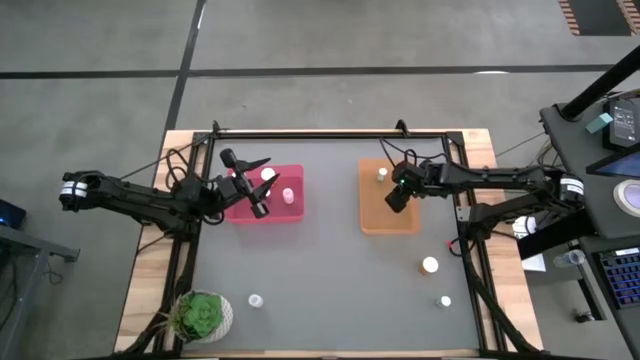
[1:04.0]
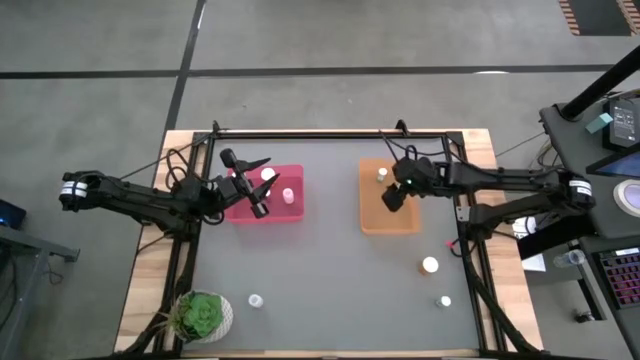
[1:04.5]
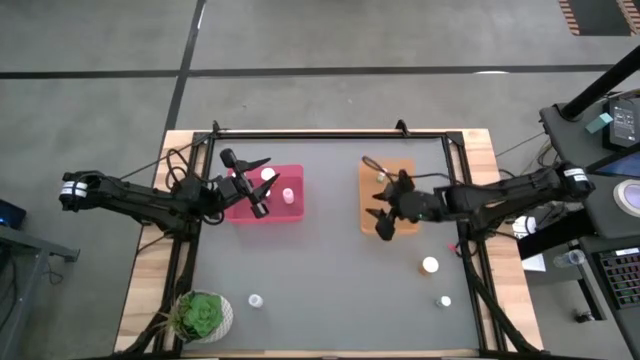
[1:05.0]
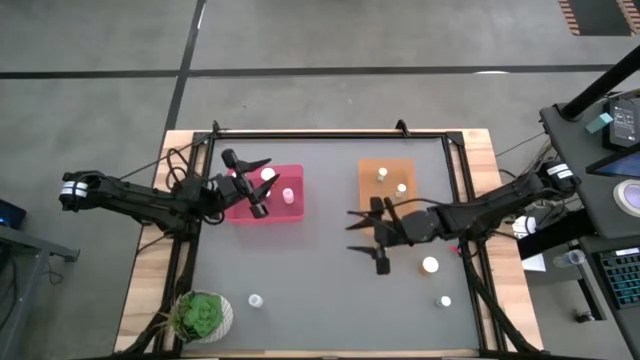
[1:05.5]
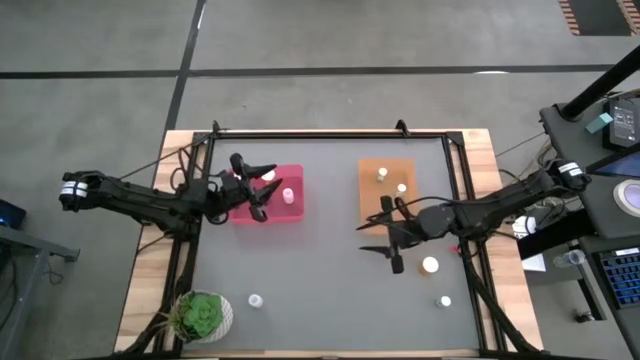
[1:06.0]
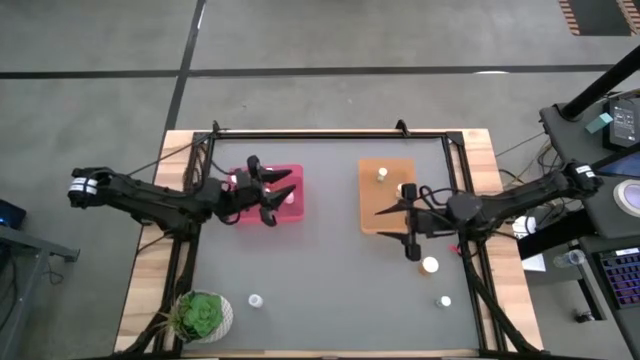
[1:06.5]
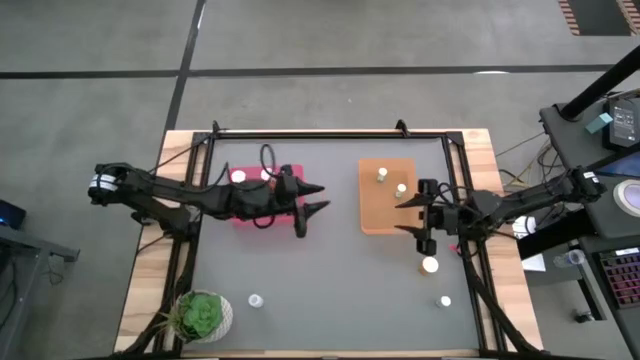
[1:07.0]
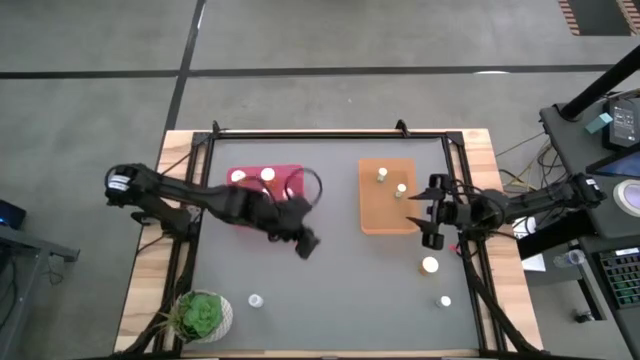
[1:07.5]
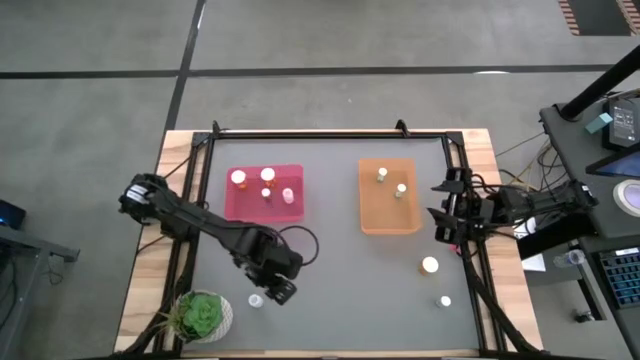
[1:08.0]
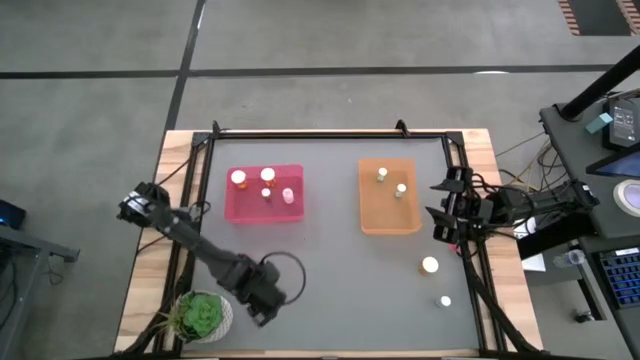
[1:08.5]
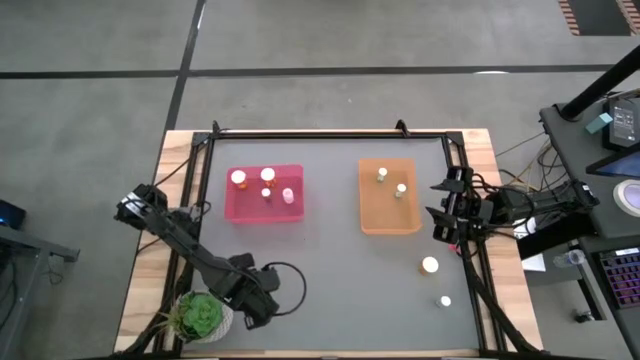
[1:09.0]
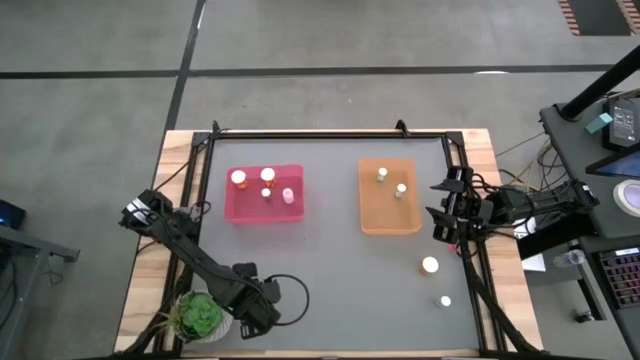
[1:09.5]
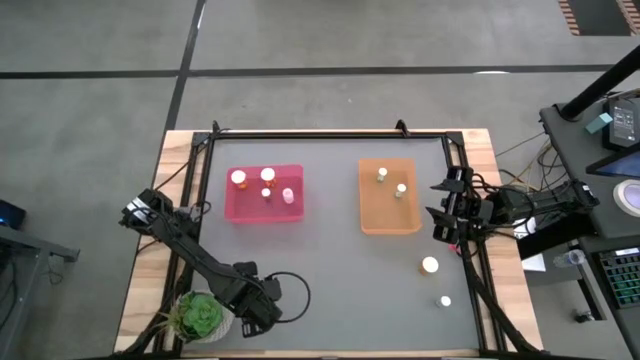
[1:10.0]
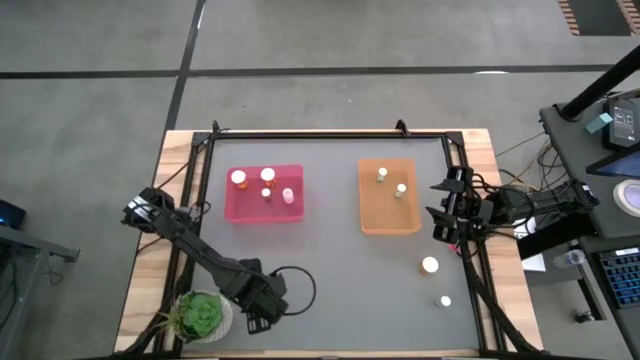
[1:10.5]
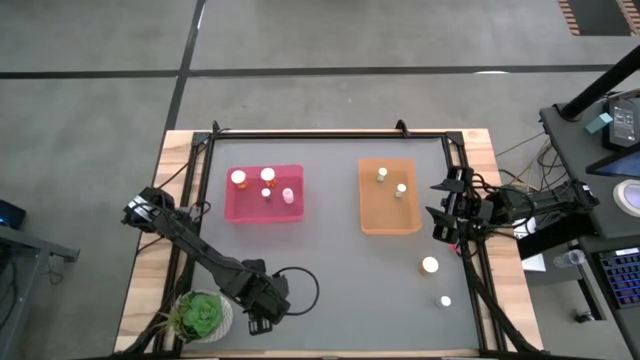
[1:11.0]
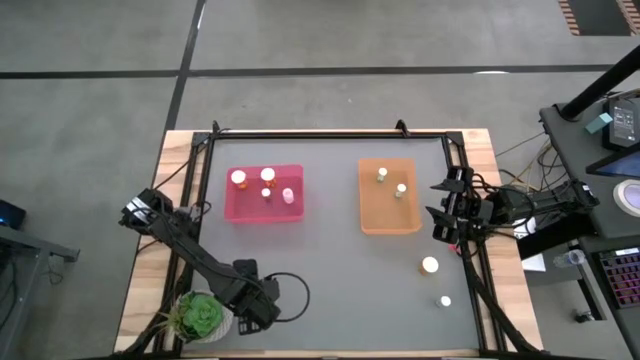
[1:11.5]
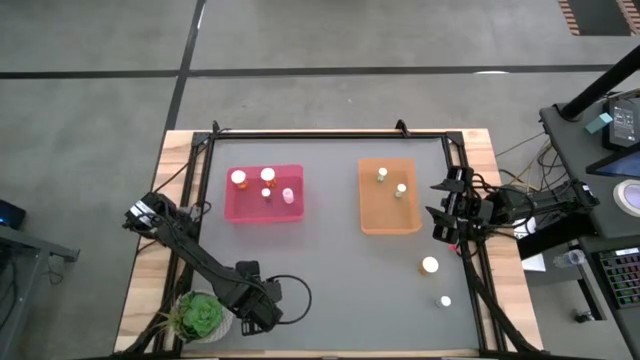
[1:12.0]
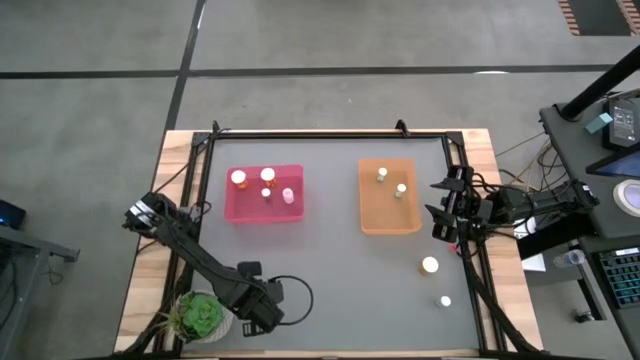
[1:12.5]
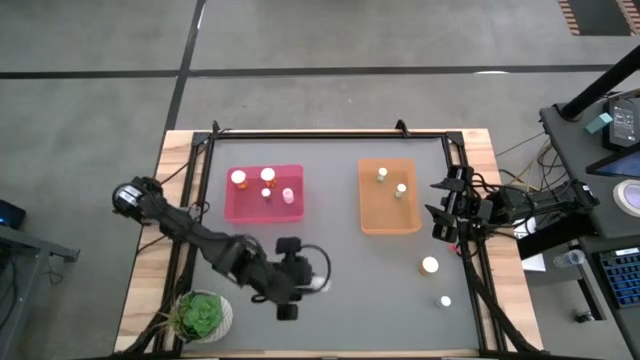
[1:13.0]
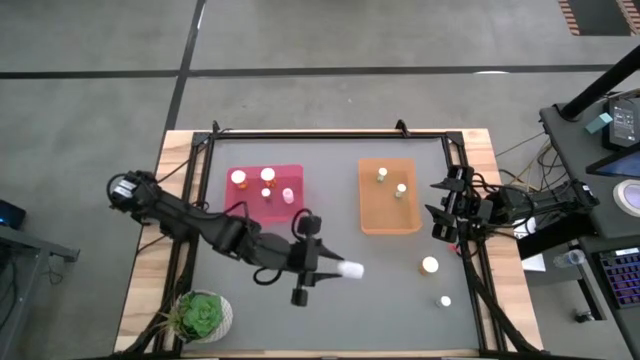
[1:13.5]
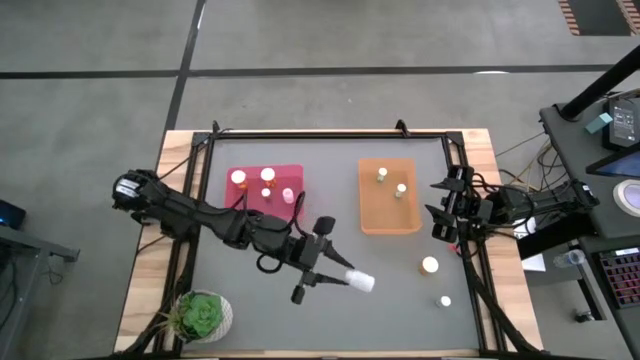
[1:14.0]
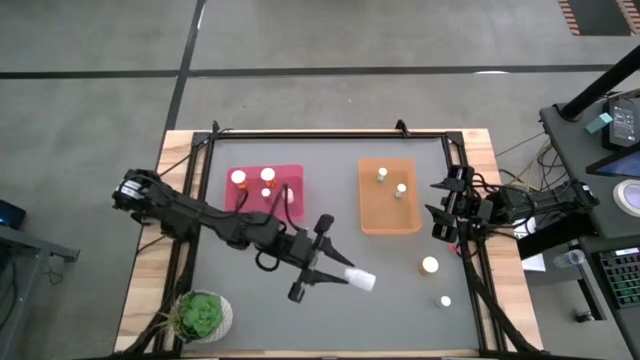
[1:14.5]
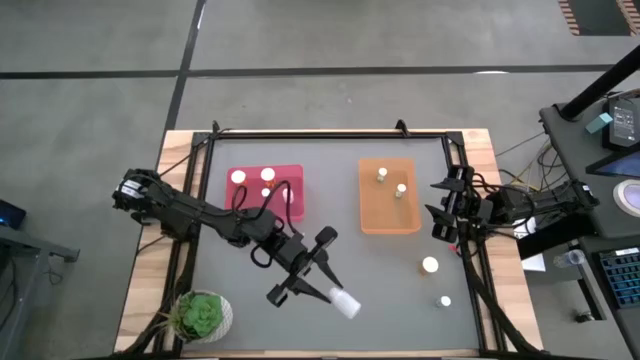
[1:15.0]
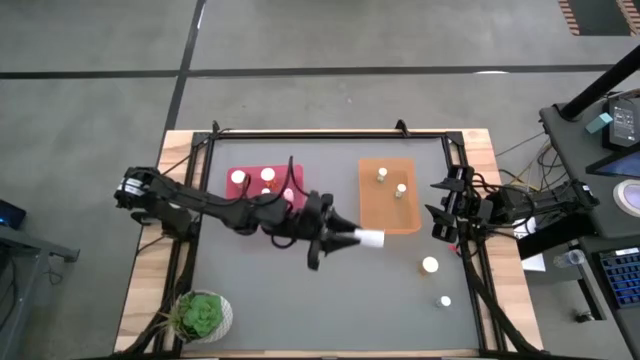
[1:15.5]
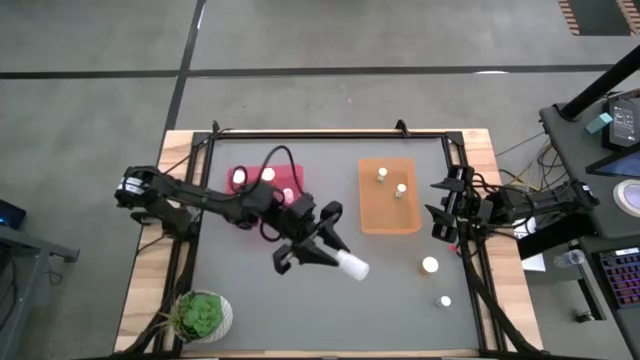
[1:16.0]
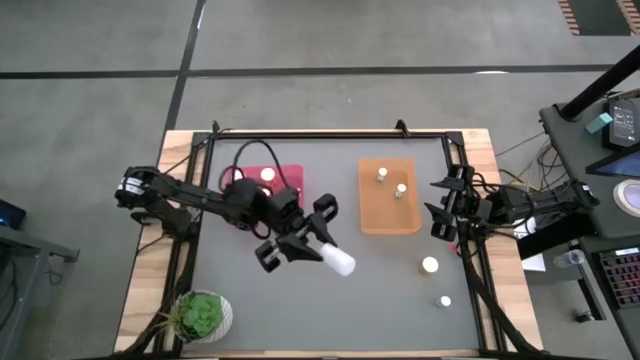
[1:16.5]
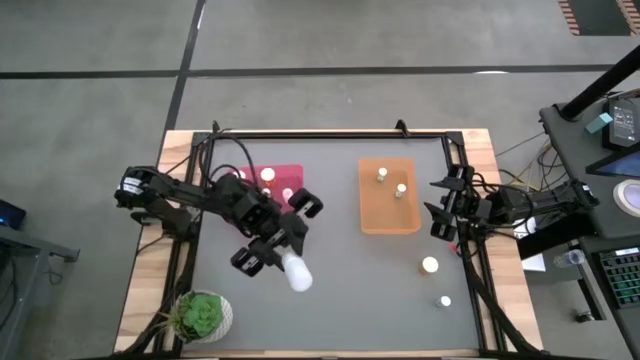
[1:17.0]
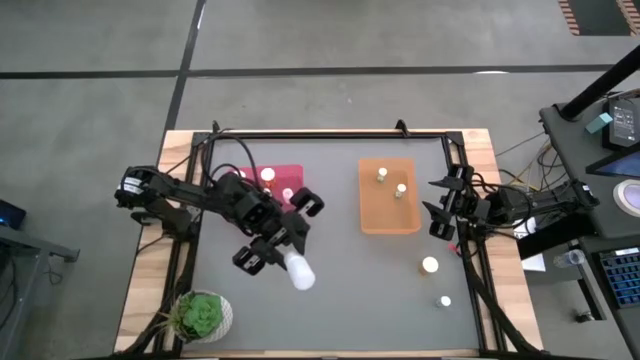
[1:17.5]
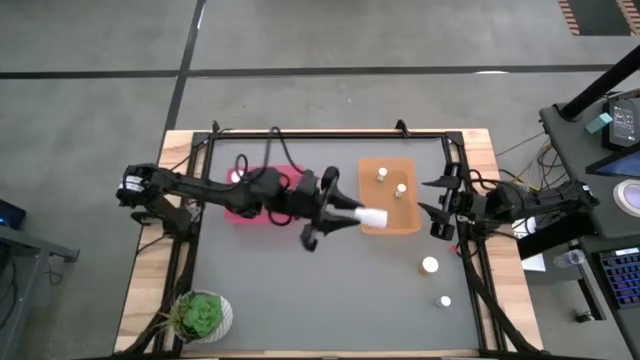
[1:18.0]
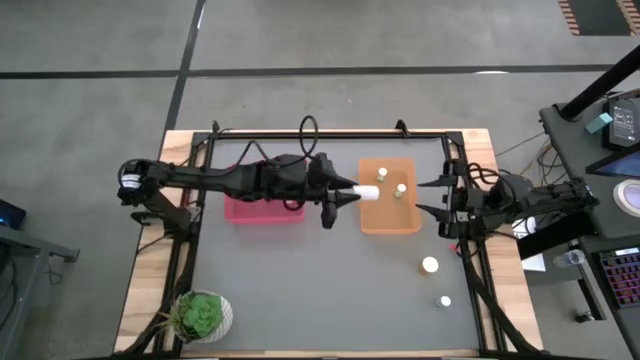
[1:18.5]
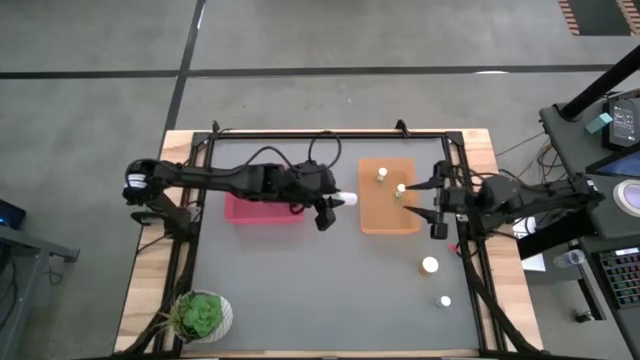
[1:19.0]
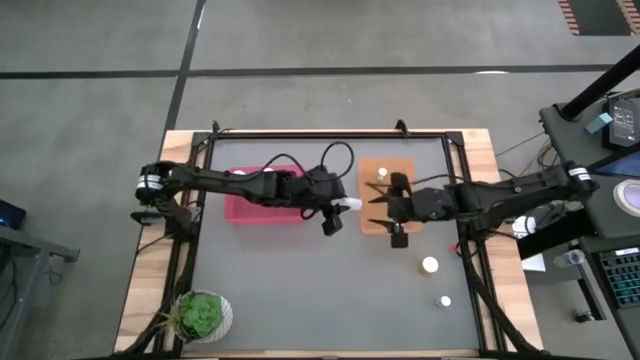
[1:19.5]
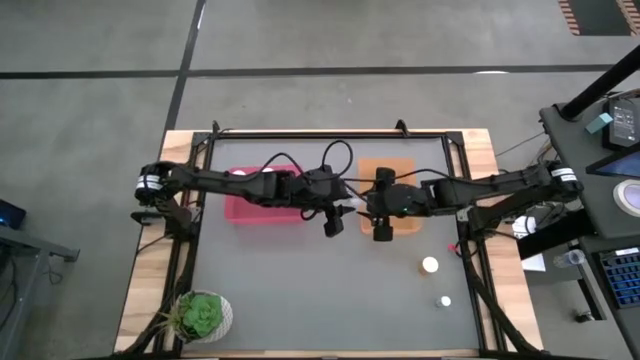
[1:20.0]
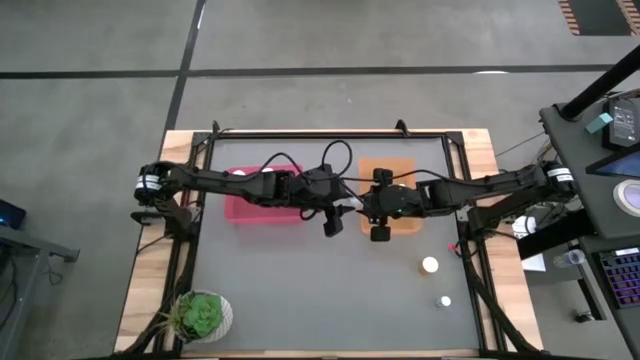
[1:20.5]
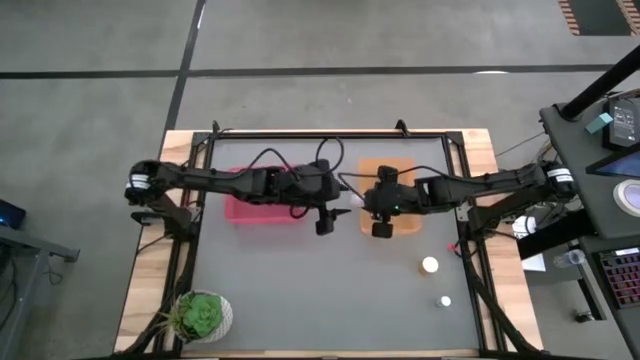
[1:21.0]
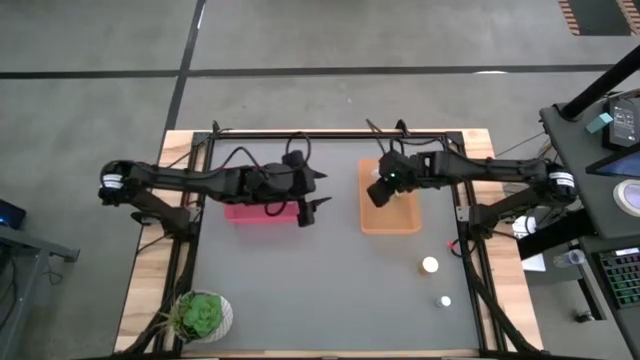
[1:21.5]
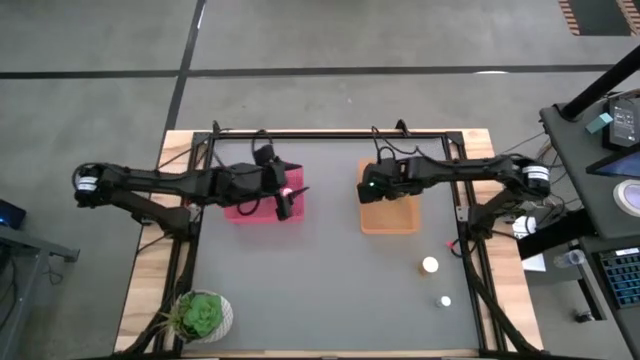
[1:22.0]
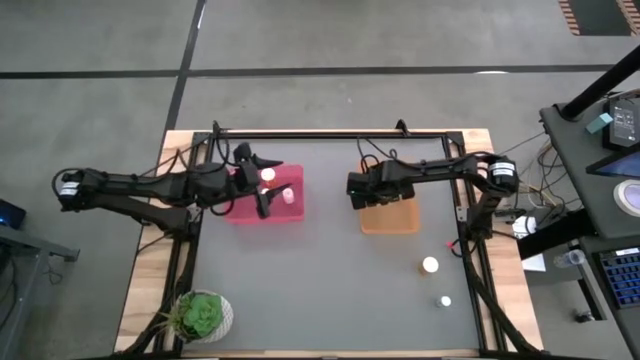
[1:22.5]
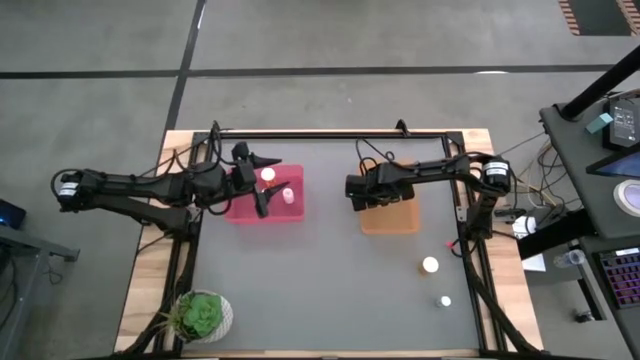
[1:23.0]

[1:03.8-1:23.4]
Task: Pick and place medicine bottles into bin by pill shape (circle, oval)
Put the white pill into the orange bin

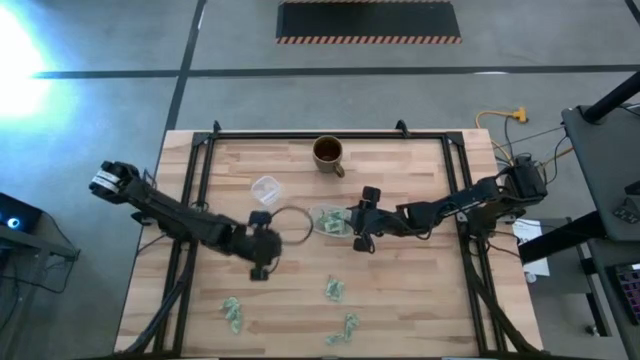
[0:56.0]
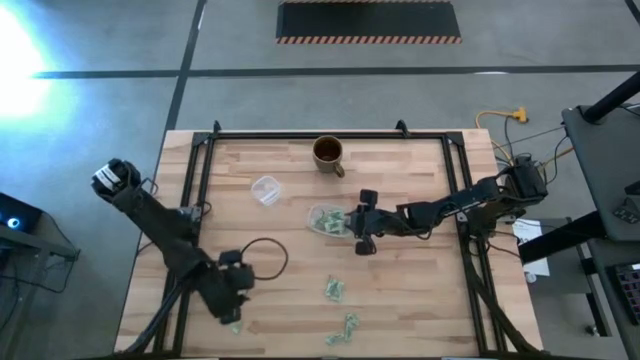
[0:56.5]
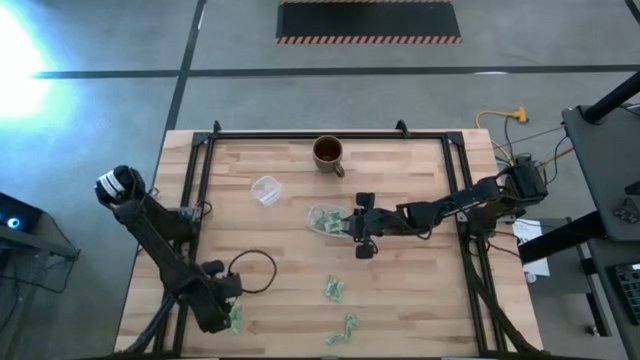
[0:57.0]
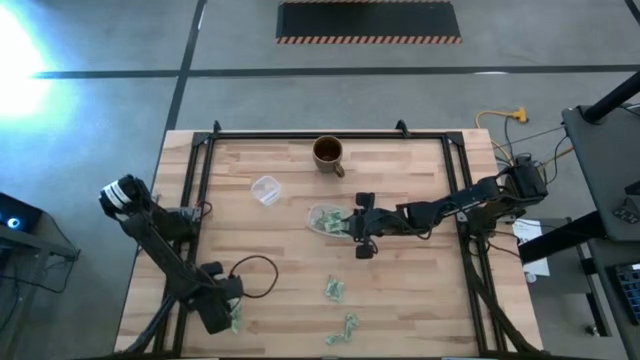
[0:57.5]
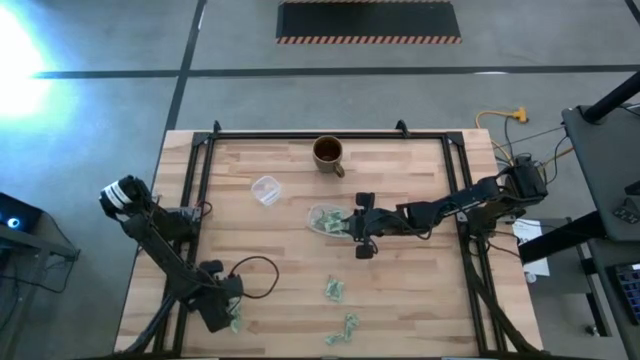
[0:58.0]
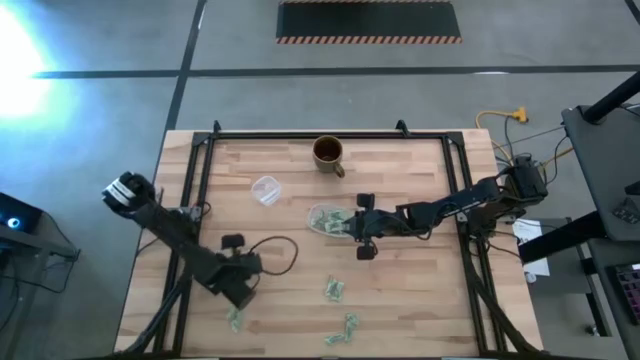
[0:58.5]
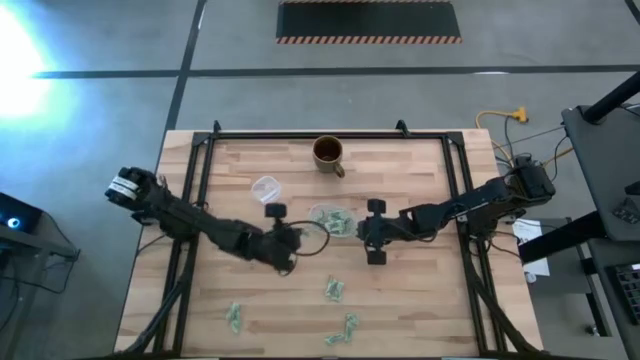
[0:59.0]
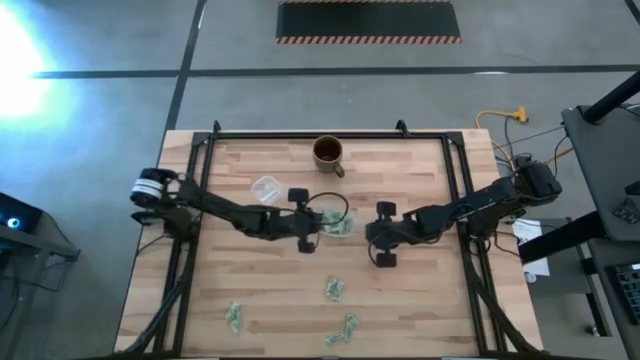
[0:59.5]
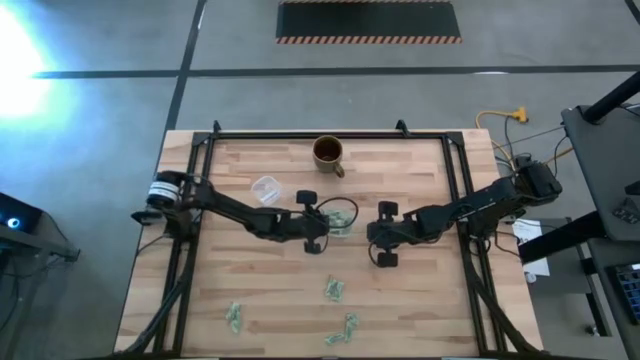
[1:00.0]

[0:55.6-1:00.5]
Task: Pick and place Stevia / Truvia into bins
Put the green stevia packet into the transparent container
